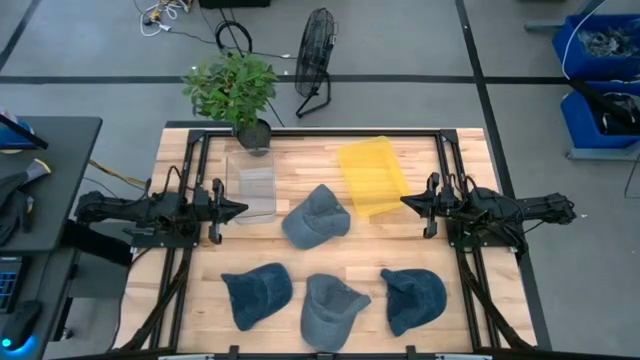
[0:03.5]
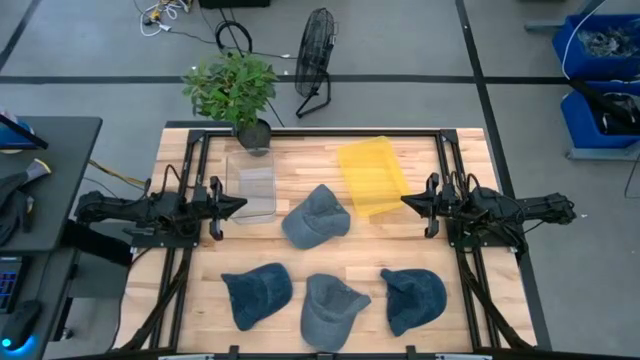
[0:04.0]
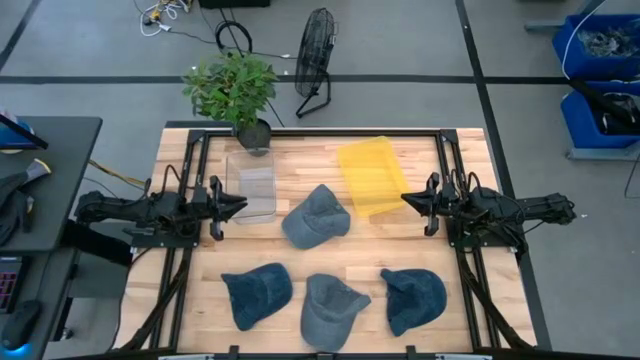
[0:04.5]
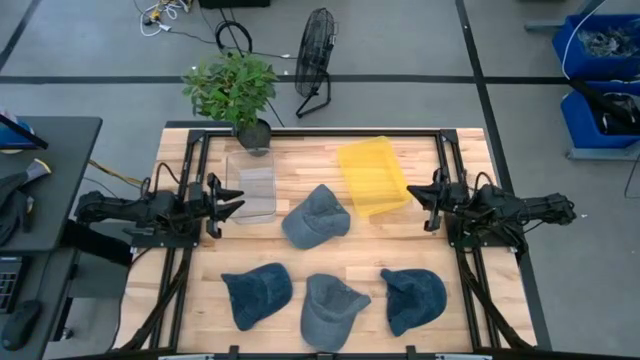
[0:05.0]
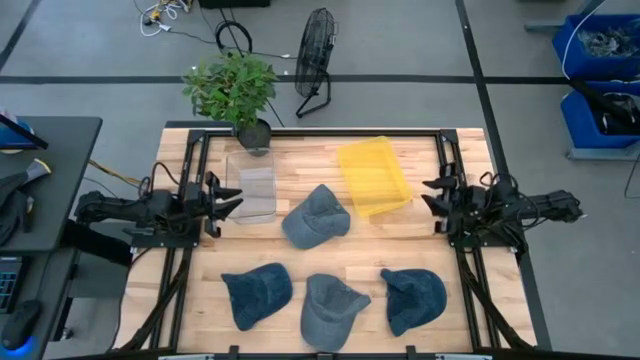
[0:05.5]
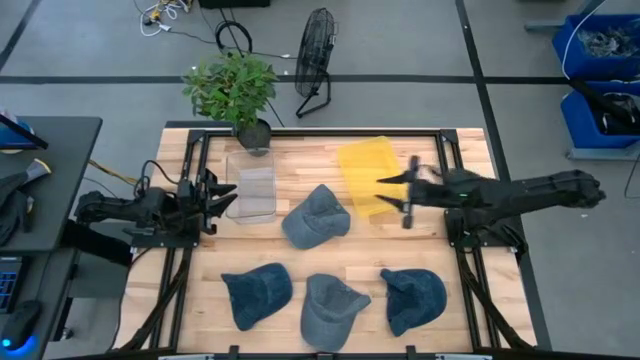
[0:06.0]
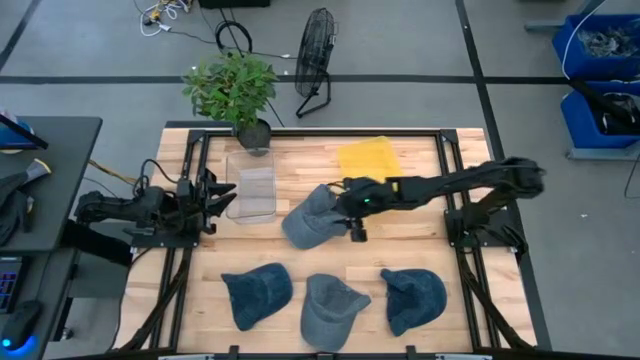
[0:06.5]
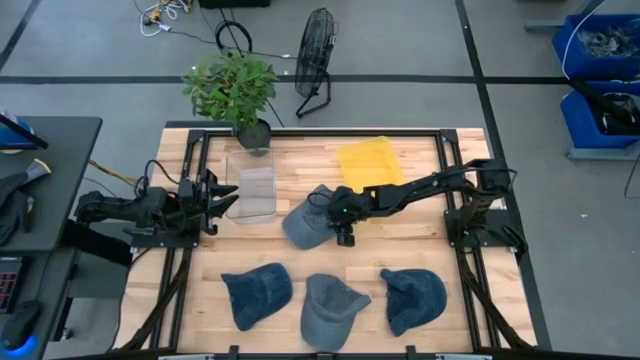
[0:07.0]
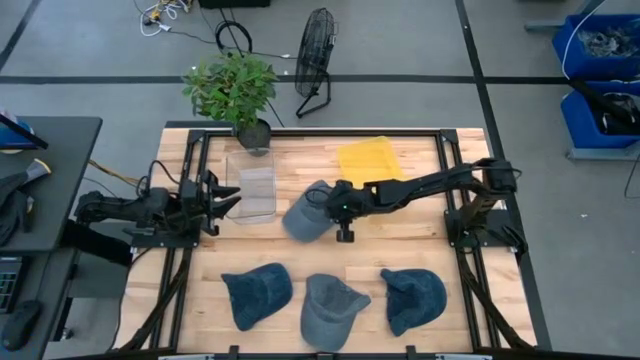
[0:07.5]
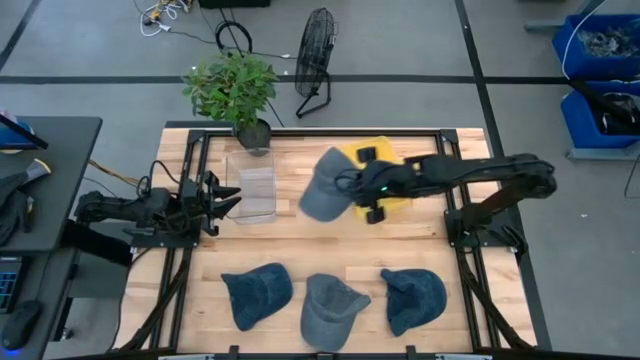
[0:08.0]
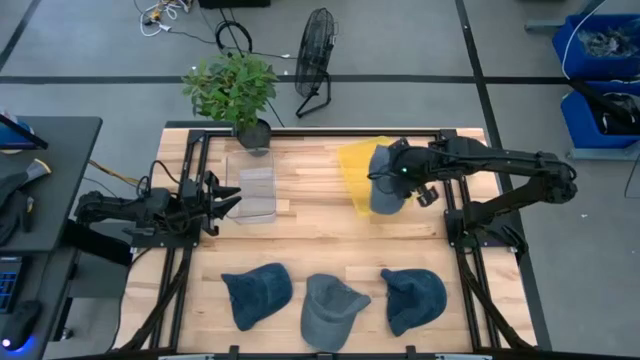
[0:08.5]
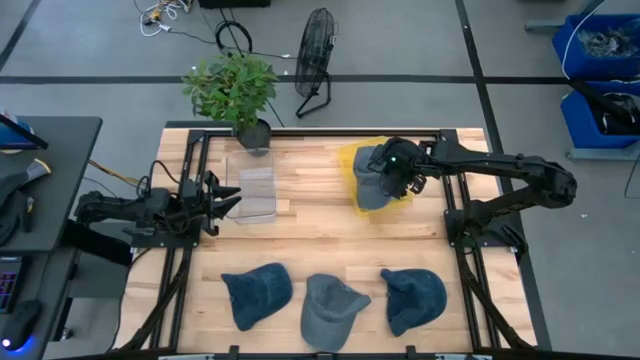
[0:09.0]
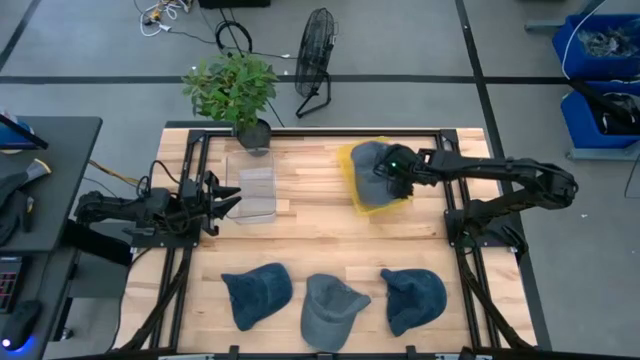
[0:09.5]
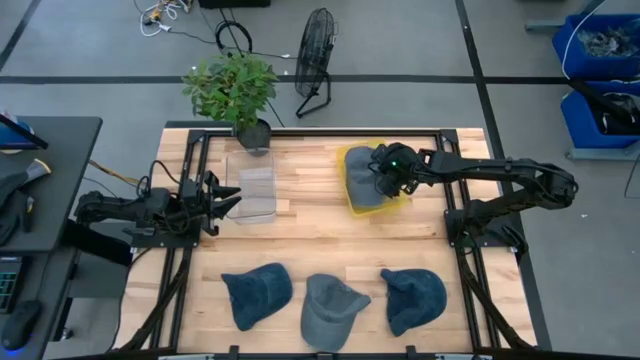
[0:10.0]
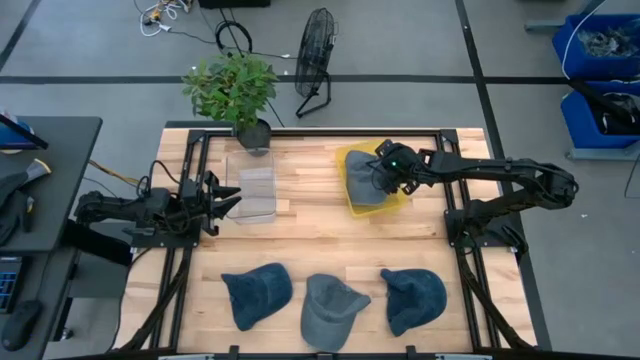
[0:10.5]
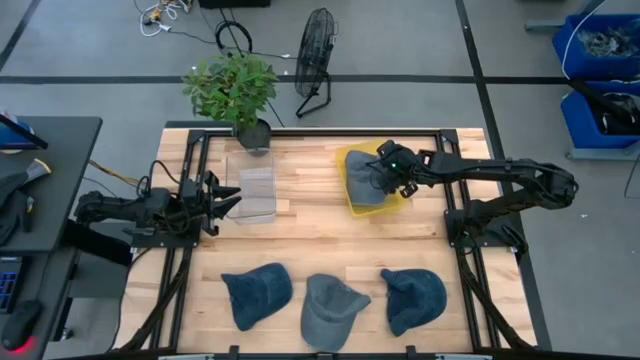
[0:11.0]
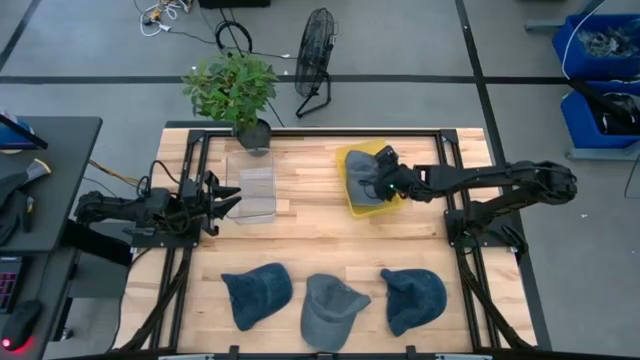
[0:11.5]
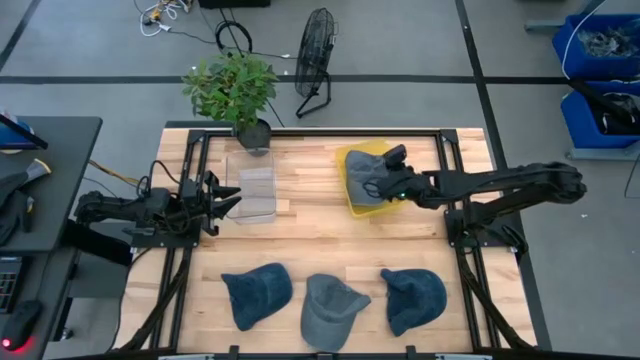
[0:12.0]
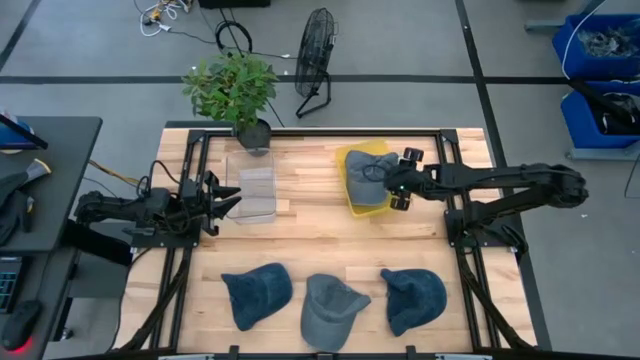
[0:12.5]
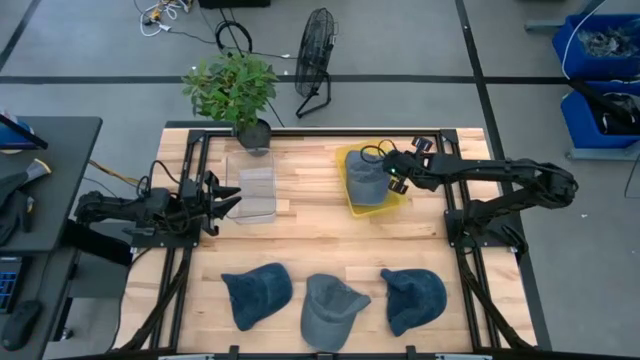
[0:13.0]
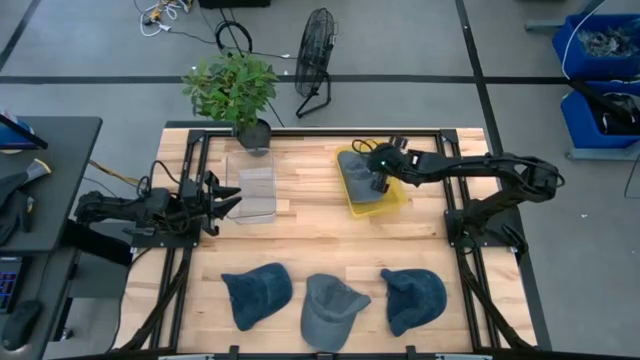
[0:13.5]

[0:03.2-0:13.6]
Task: Pick & Place hat
Put the top gray cap into the yellow bin

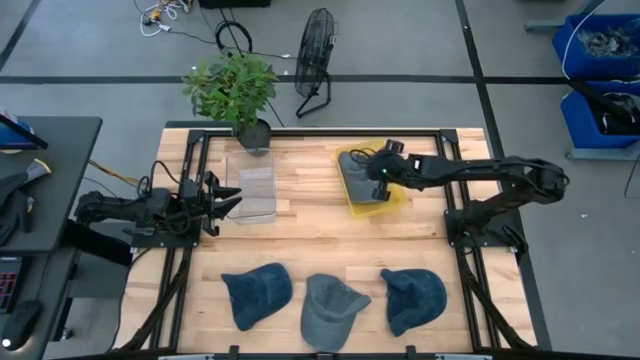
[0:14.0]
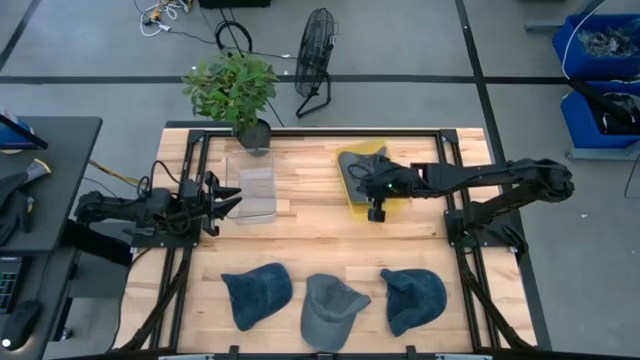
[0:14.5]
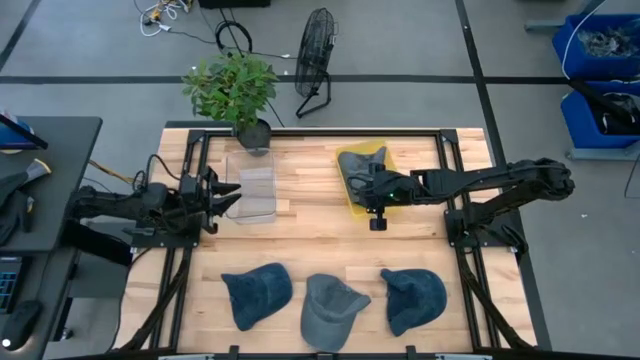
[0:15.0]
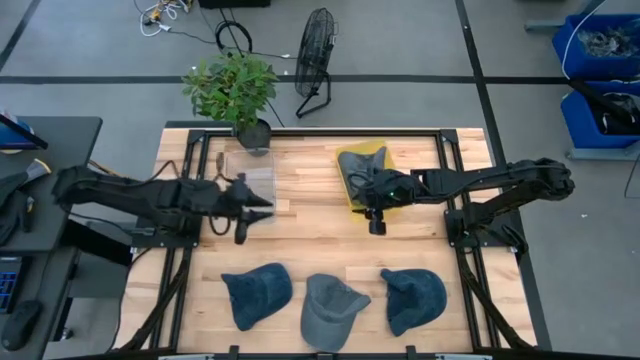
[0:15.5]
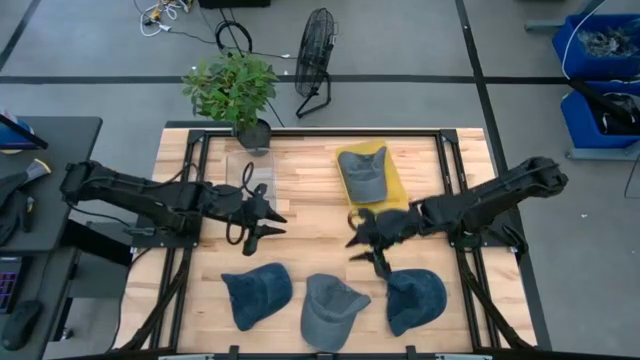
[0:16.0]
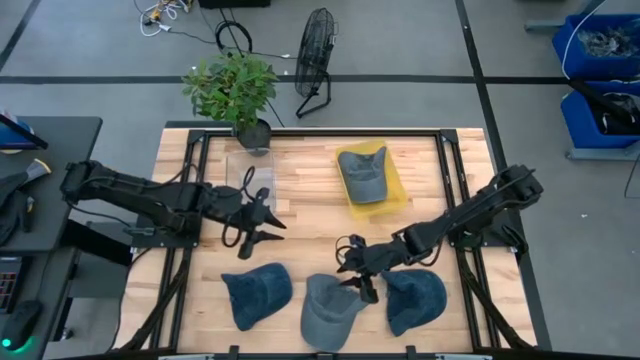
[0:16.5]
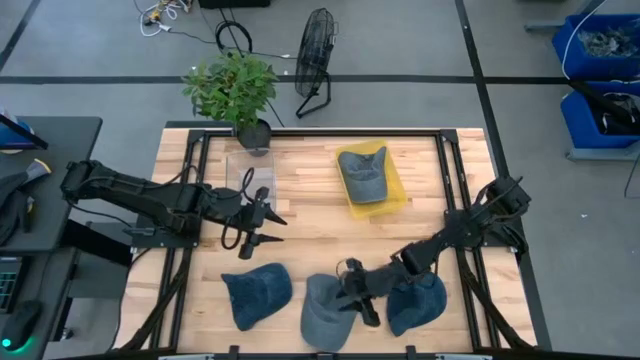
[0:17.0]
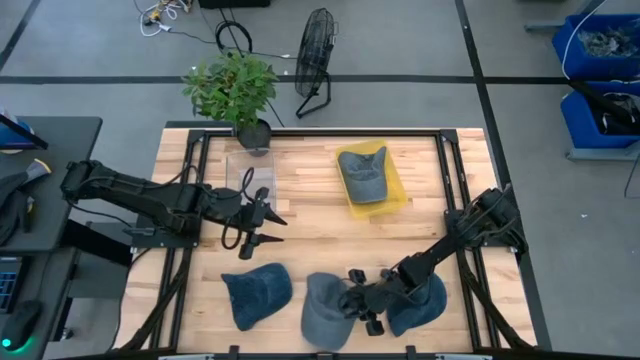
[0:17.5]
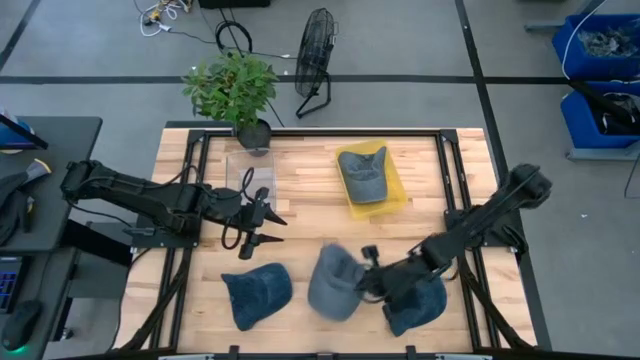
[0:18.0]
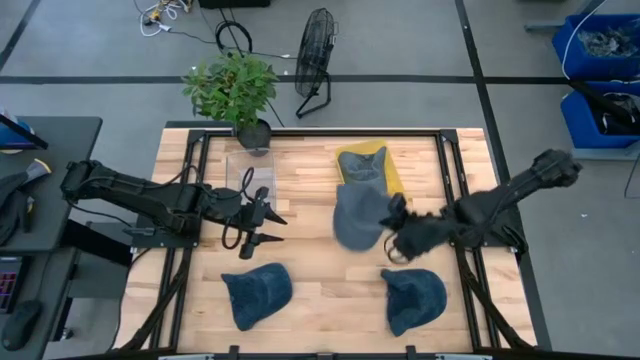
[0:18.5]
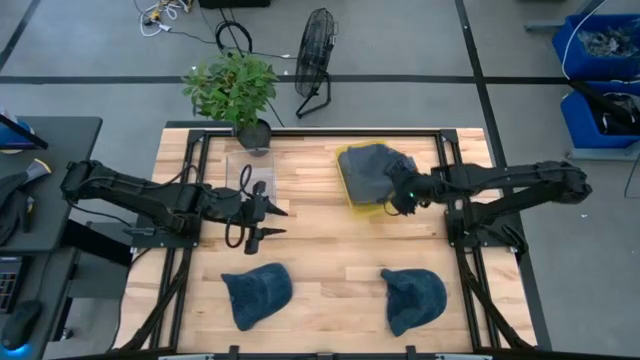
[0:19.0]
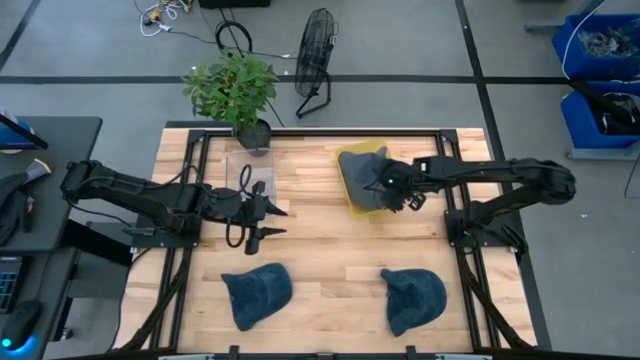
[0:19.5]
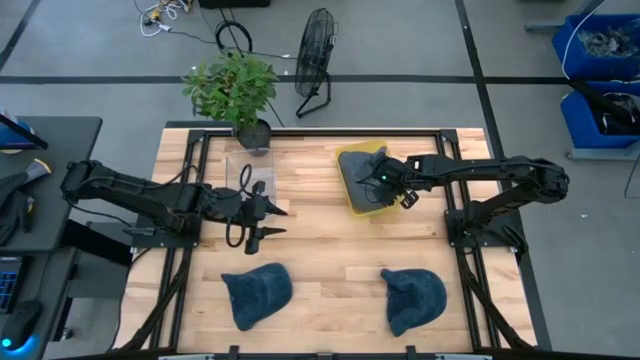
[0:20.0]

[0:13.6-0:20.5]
Put the gray cap into the yellow bin

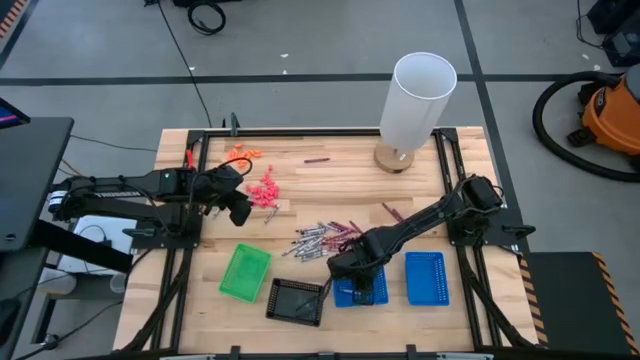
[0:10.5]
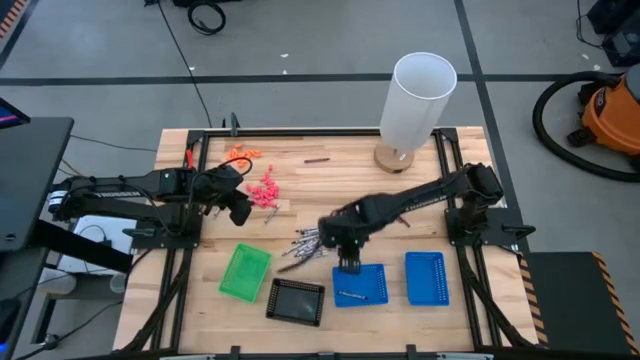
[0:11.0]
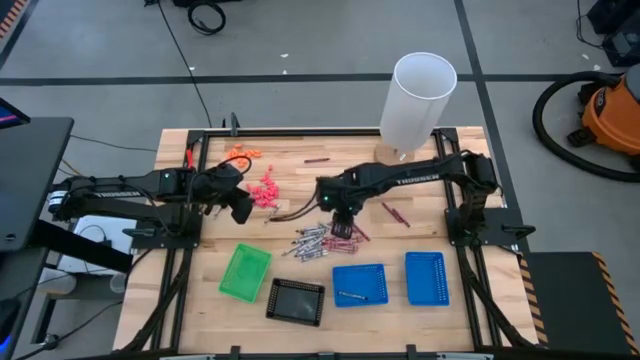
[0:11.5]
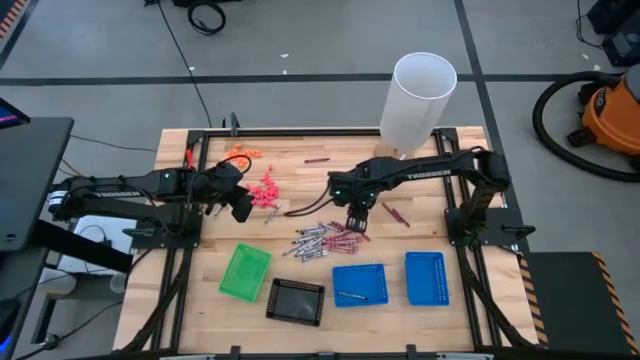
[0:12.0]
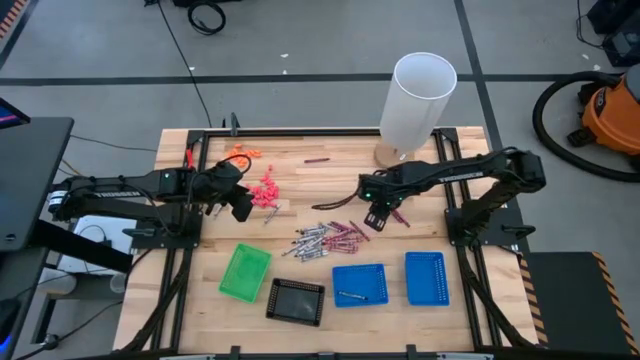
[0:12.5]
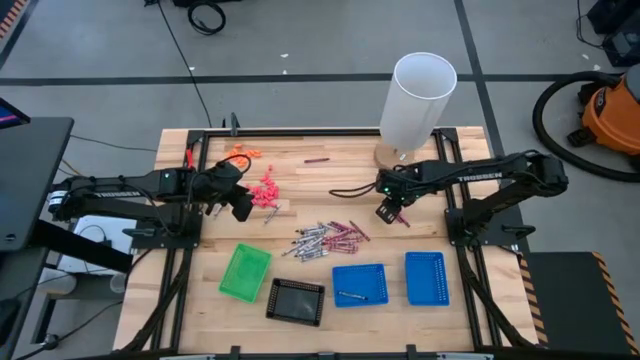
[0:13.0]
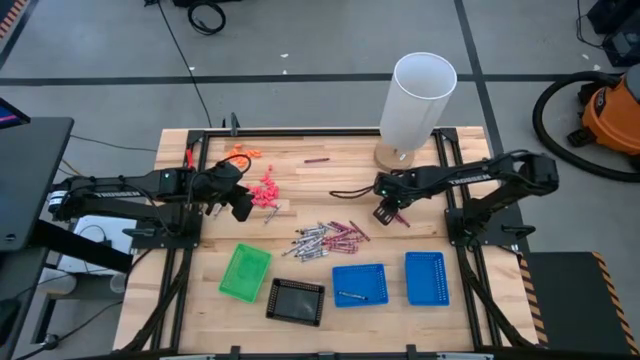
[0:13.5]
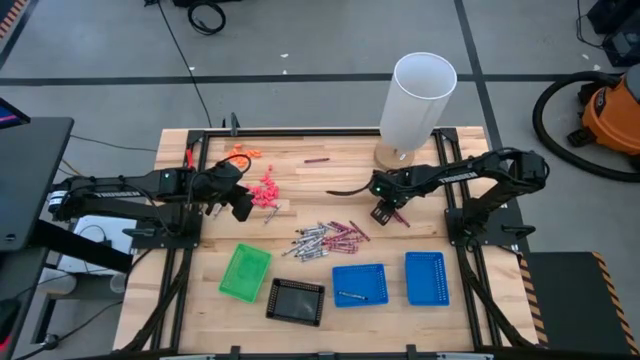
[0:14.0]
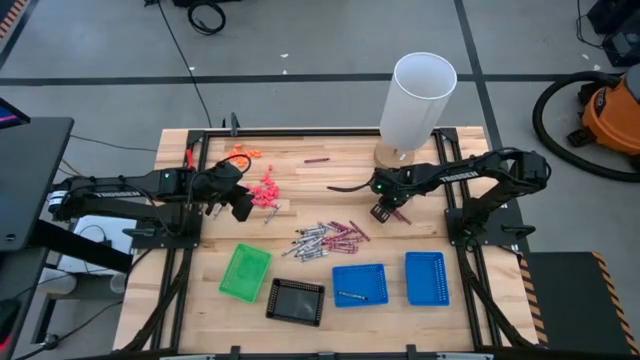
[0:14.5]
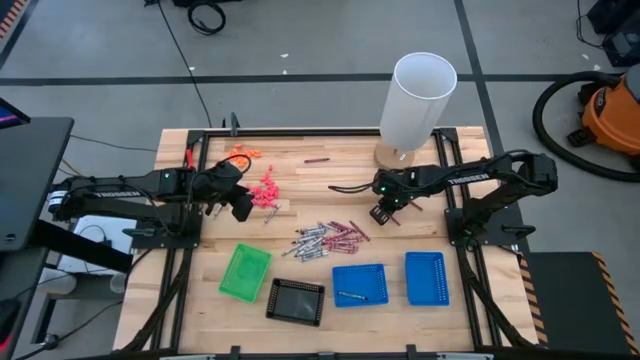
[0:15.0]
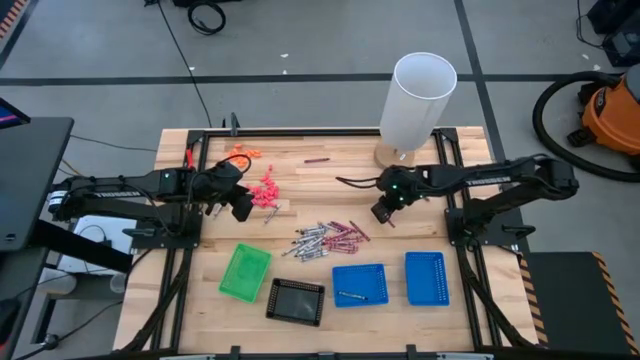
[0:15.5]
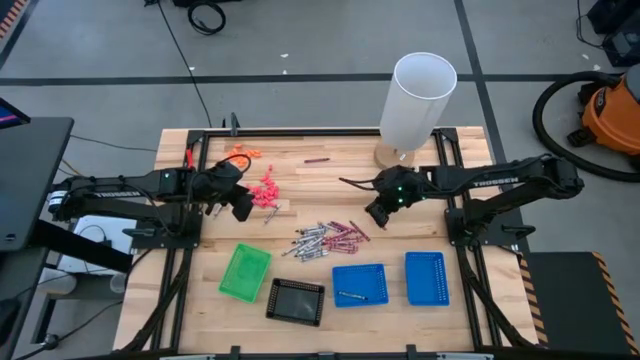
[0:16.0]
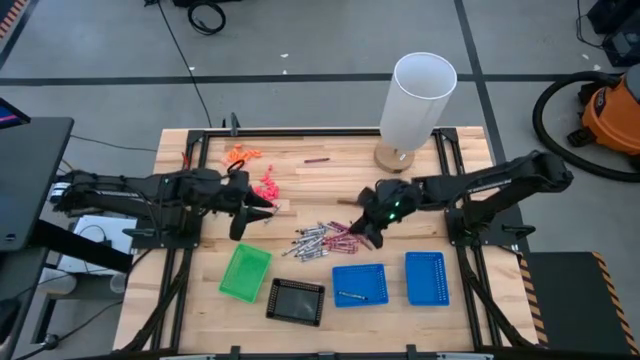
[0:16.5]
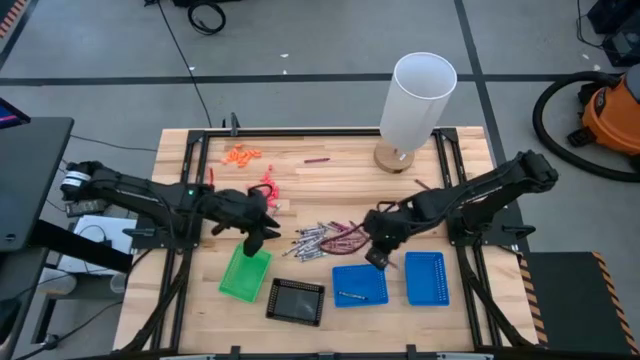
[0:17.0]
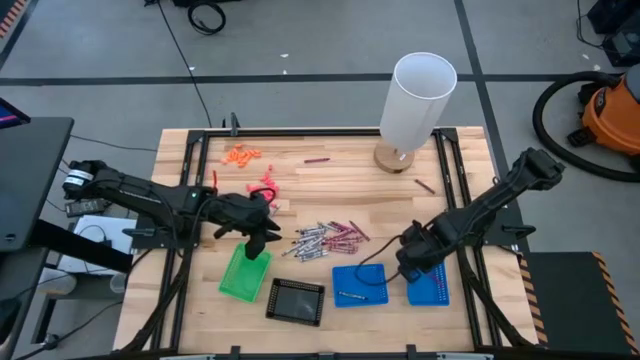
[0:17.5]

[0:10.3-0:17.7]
Task: Sort crayons
Put the red crayon into the right blue basket
